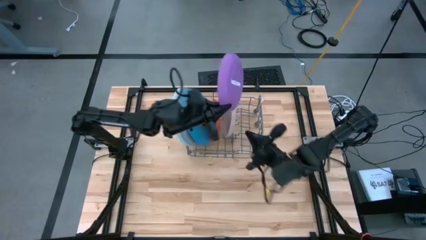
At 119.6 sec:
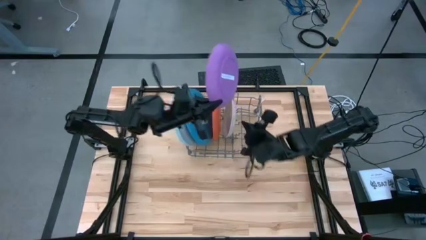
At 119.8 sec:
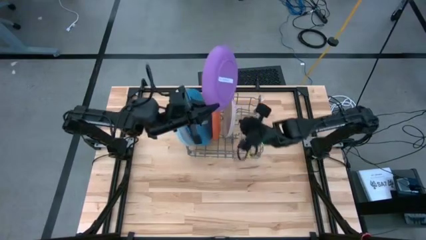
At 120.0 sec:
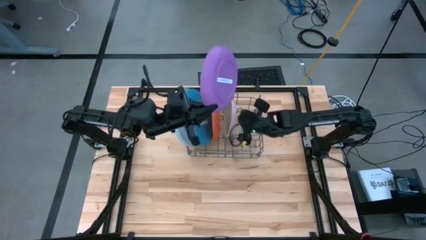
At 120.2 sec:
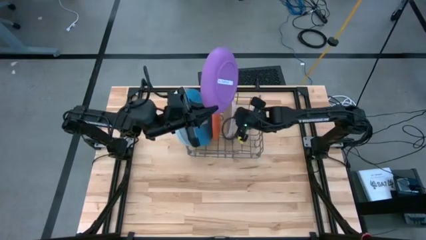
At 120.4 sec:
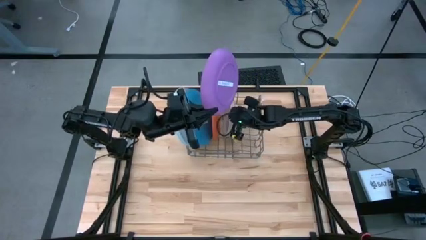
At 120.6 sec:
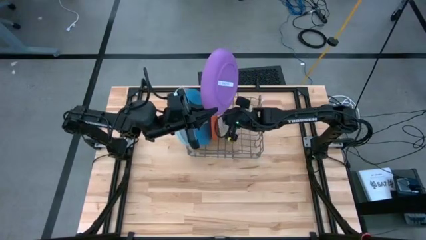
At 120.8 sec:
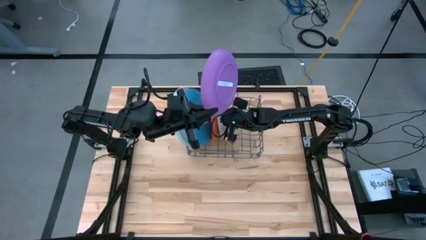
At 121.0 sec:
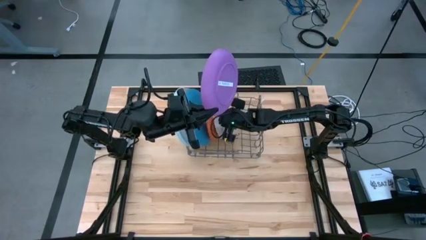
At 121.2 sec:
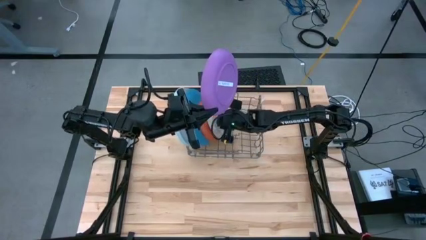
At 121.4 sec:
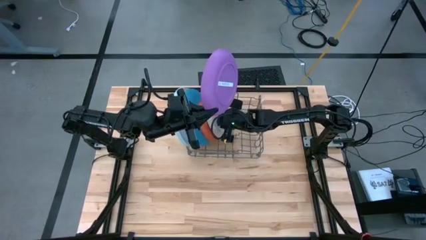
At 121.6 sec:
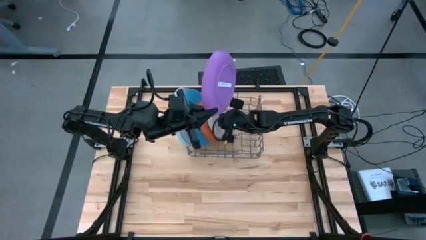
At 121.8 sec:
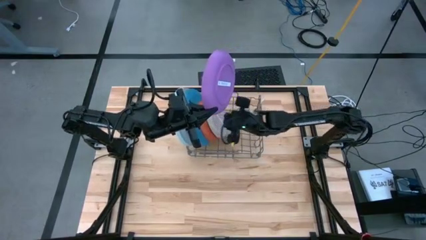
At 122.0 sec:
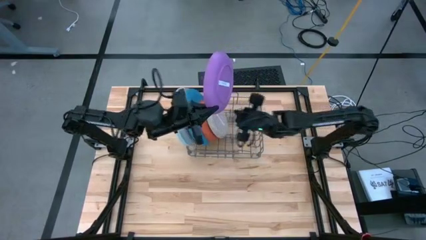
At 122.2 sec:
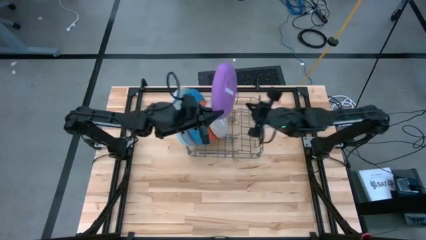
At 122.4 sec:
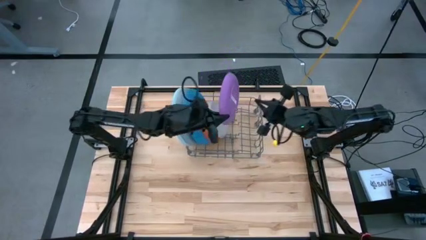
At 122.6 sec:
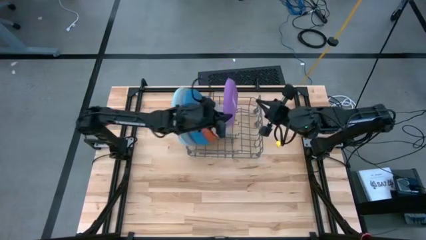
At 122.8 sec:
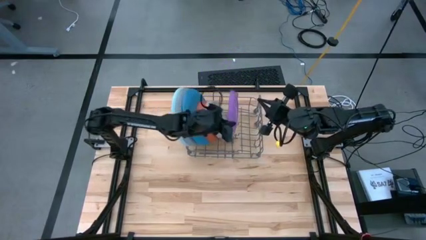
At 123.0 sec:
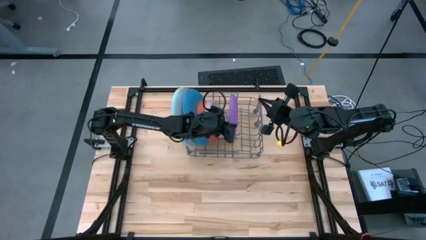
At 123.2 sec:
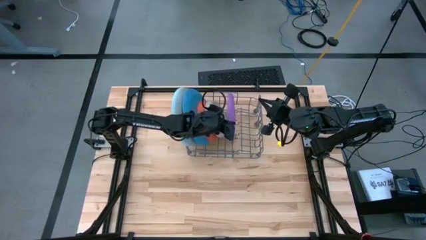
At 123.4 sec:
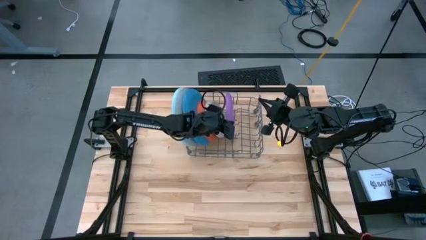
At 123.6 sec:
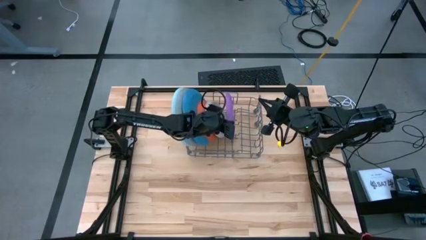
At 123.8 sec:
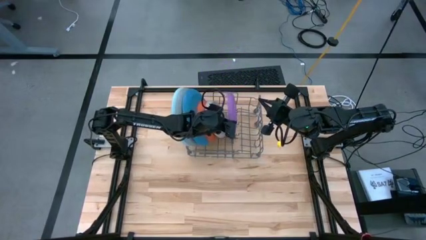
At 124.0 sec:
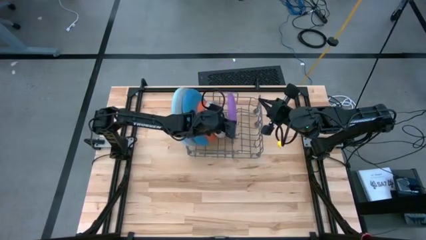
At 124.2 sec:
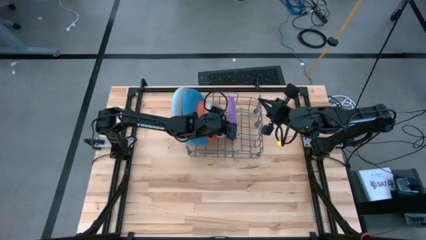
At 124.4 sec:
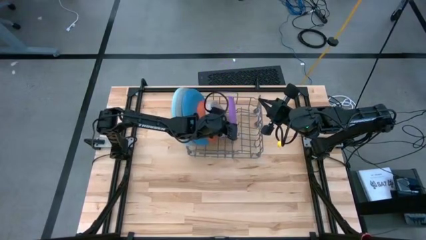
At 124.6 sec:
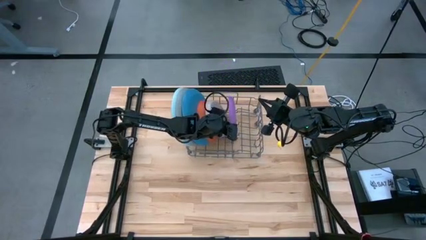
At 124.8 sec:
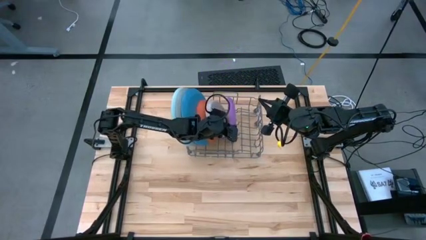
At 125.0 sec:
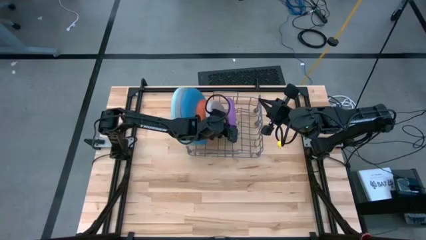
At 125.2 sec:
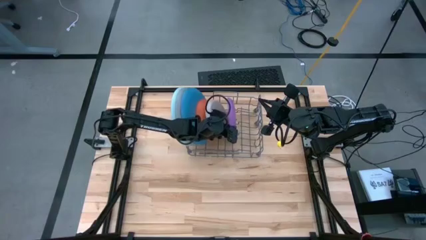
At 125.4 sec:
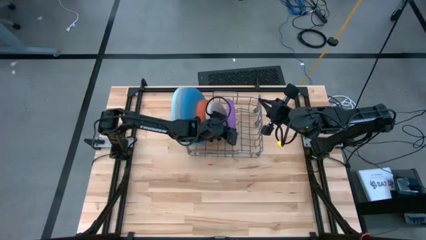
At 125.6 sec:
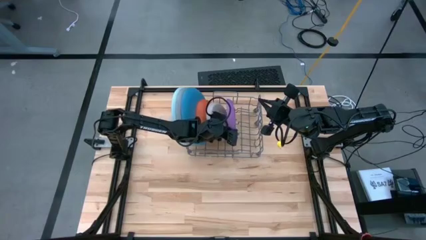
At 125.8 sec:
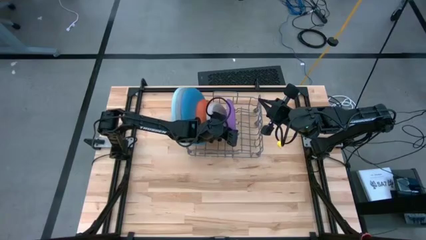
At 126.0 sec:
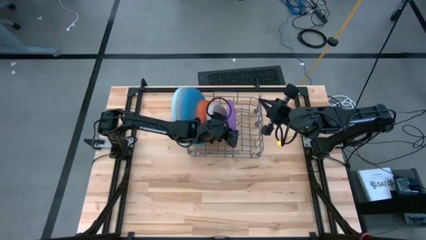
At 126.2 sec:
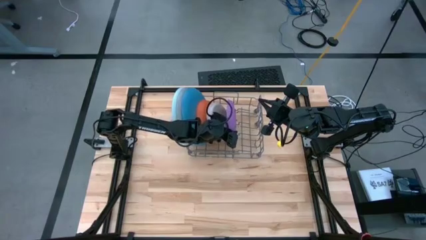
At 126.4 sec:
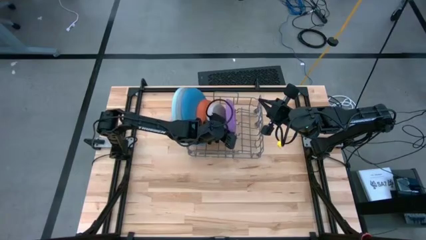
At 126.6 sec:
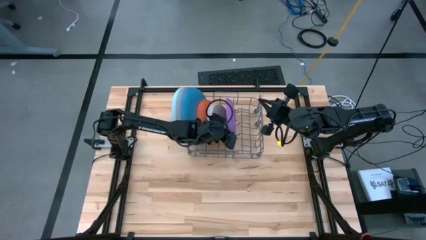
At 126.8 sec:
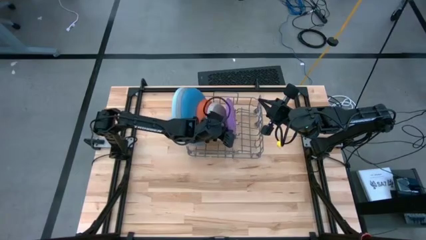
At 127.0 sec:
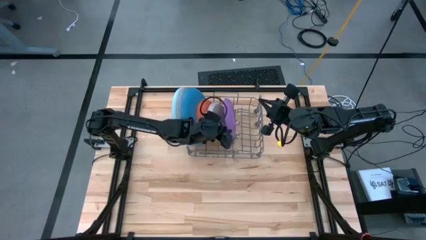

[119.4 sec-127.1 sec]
Task: Sort dishes
Put the violet plate into the dish rack

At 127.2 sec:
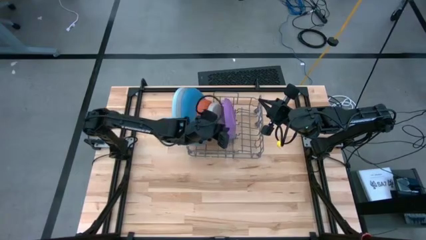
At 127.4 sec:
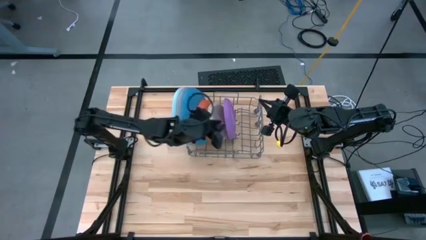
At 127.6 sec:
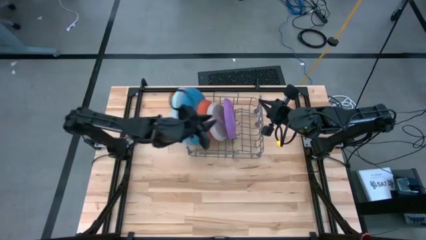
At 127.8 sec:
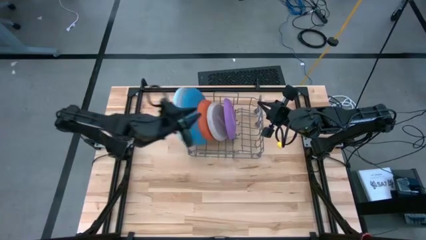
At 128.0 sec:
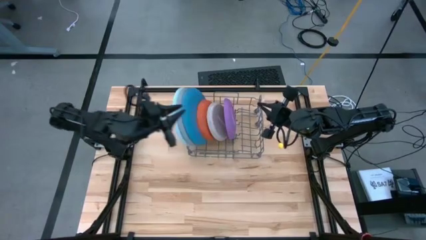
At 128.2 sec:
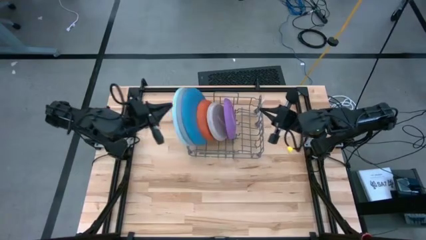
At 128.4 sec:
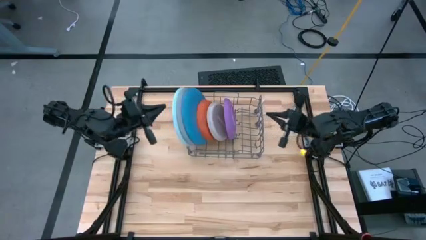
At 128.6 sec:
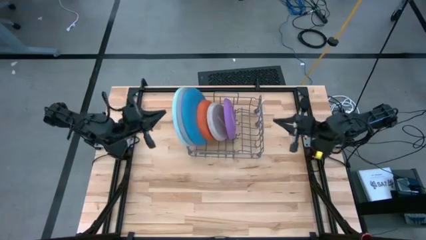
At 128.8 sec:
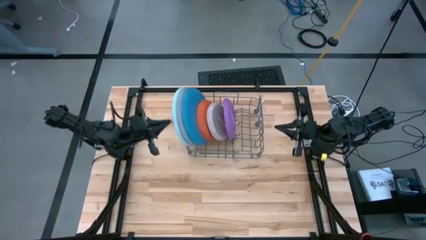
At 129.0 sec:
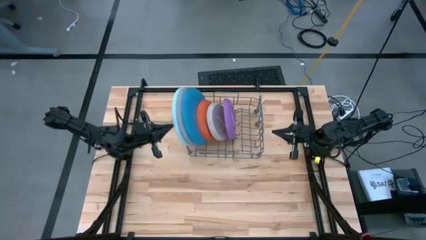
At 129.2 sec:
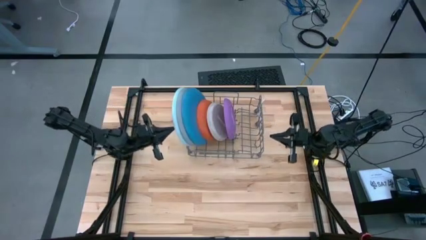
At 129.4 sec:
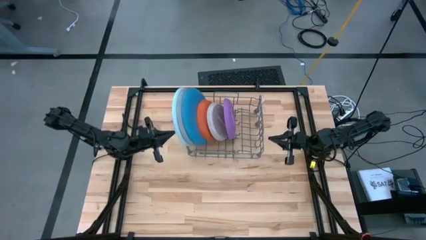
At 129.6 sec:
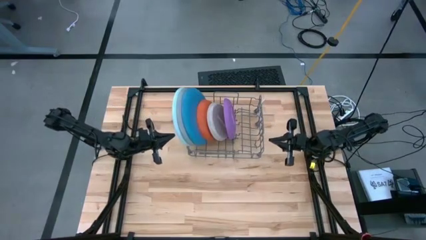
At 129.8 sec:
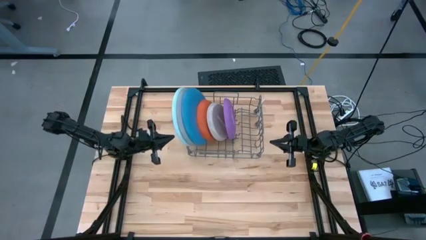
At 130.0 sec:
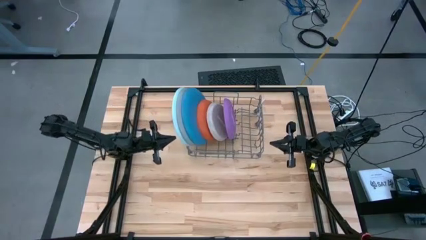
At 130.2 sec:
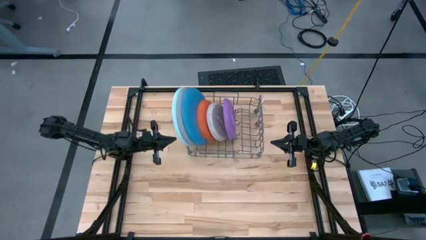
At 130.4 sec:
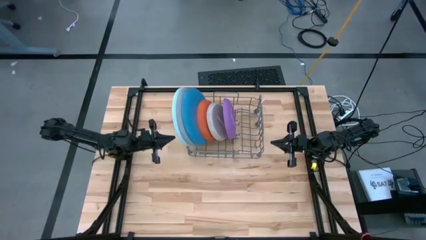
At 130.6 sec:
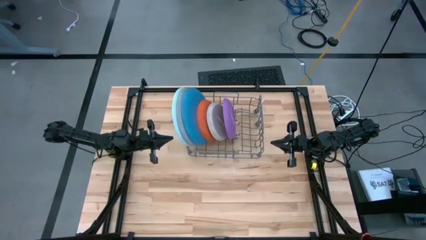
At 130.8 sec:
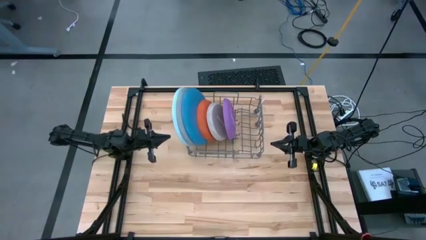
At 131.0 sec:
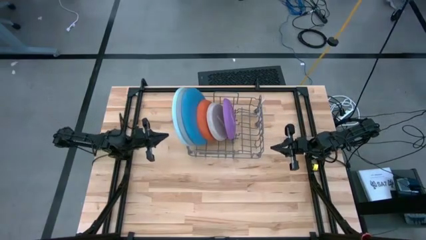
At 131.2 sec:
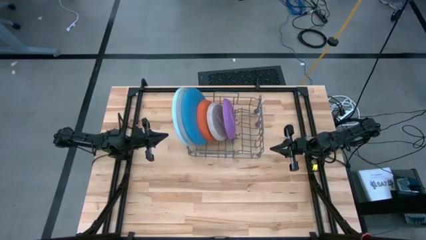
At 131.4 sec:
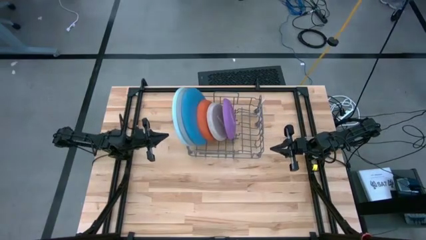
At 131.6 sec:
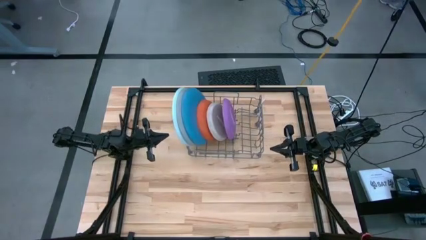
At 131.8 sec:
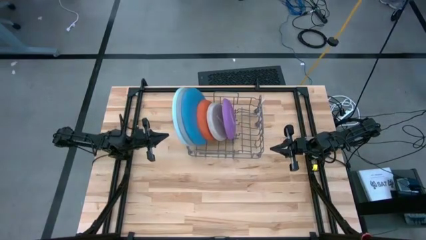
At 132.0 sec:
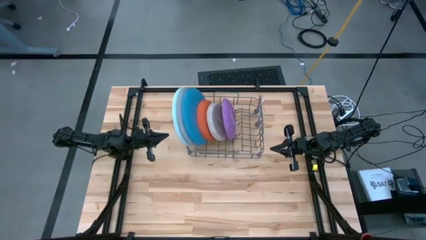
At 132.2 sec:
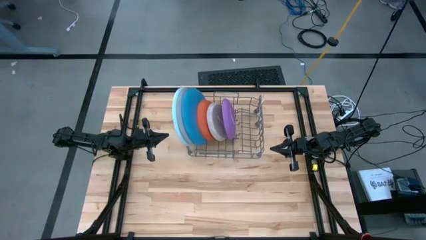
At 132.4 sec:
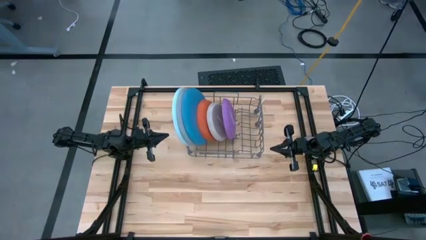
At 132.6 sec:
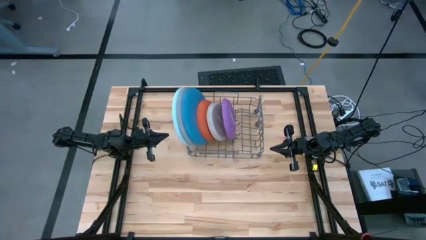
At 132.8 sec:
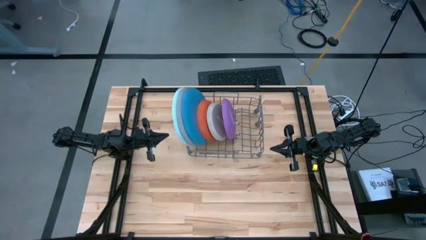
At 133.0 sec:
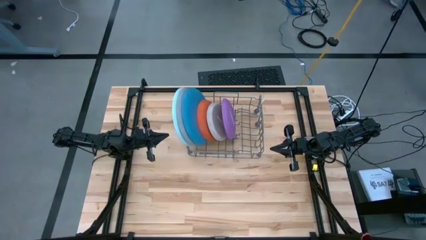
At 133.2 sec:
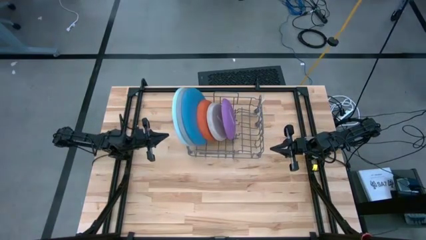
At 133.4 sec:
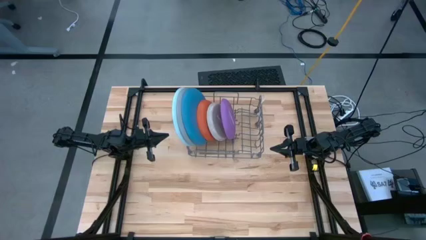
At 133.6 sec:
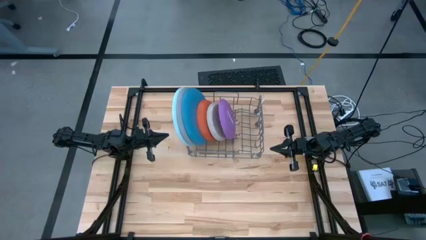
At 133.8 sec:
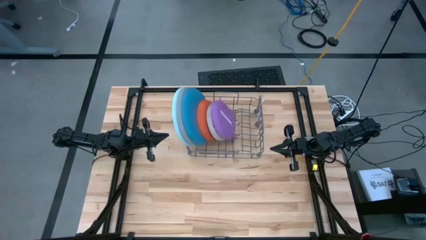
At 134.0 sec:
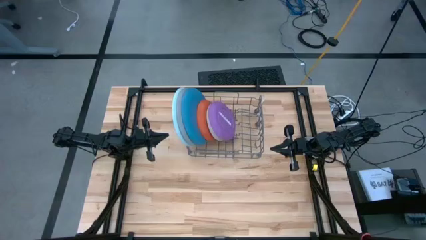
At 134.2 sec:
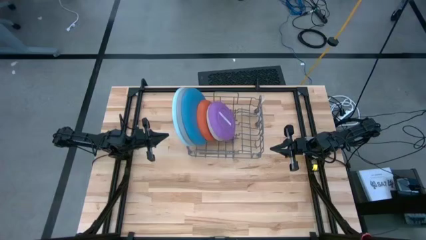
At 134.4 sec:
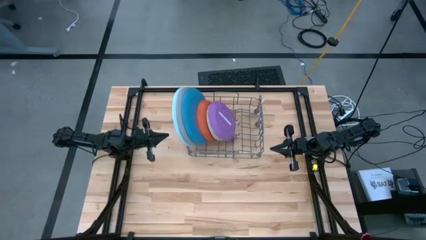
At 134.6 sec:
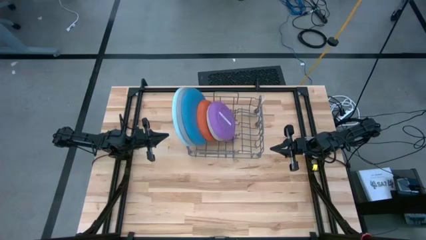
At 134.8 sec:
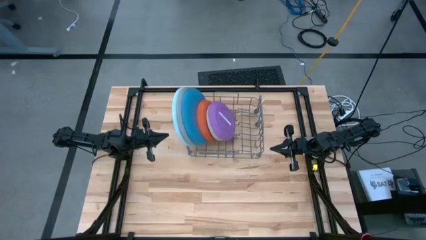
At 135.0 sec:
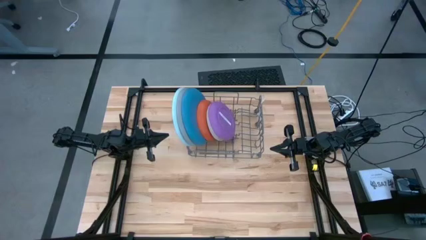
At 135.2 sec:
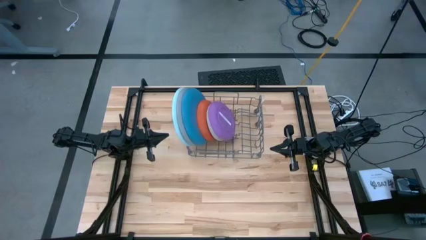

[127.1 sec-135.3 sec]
Return to Home Position
